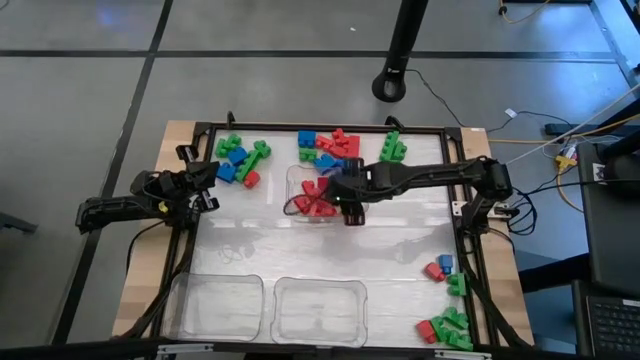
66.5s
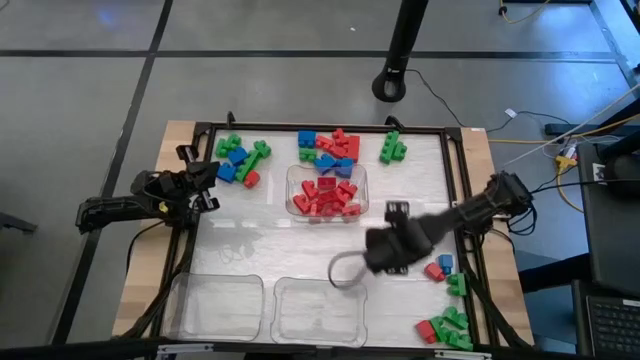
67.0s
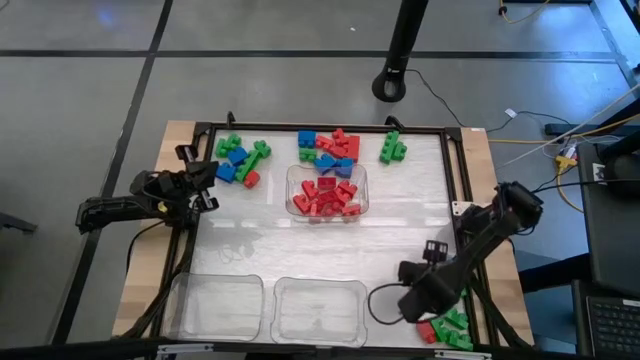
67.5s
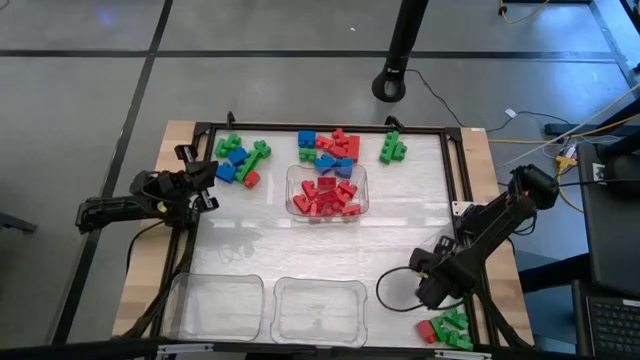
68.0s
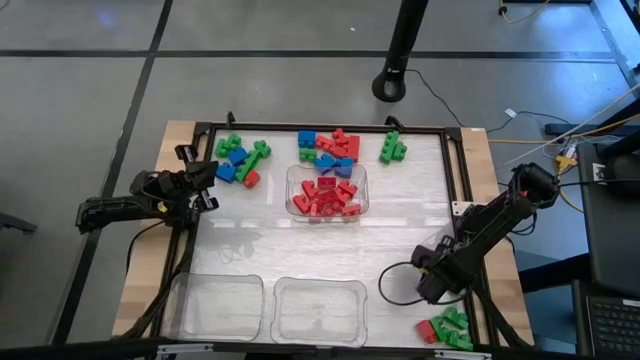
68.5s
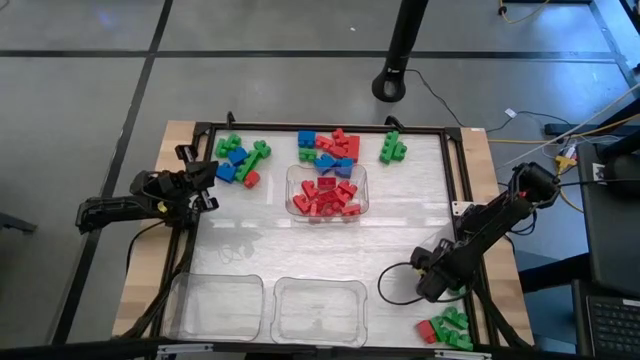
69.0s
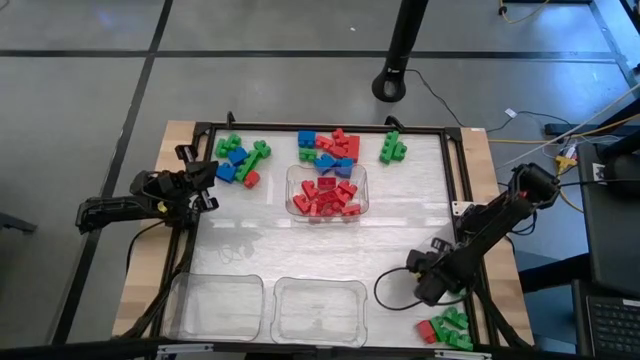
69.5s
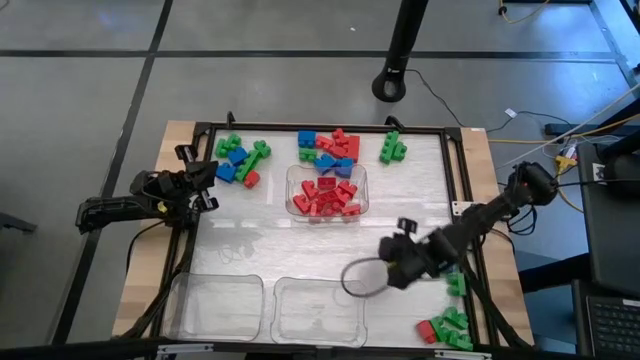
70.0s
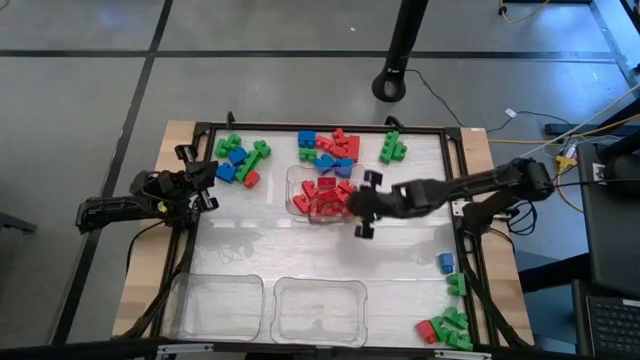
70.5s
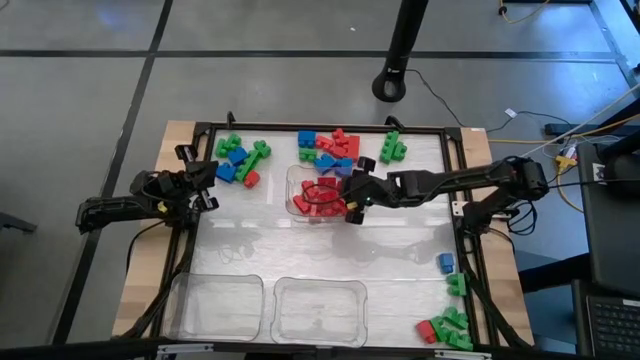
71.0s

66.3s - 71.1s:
Task: Sort blocks
Put the red game piece into the top right transparent bin

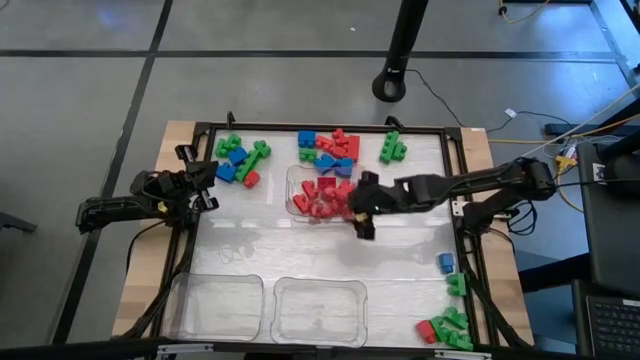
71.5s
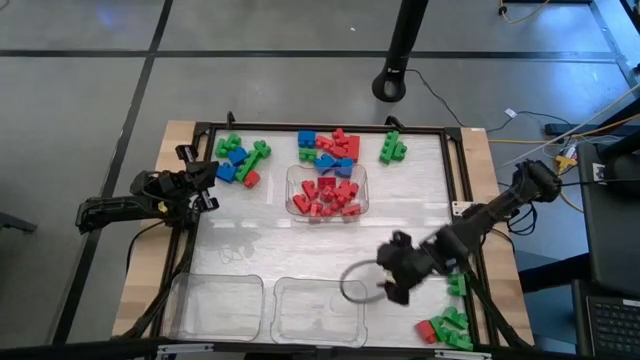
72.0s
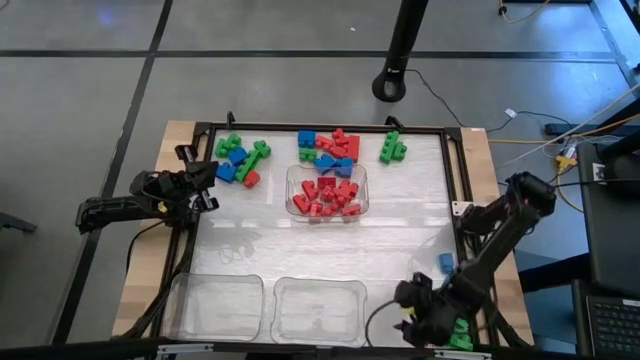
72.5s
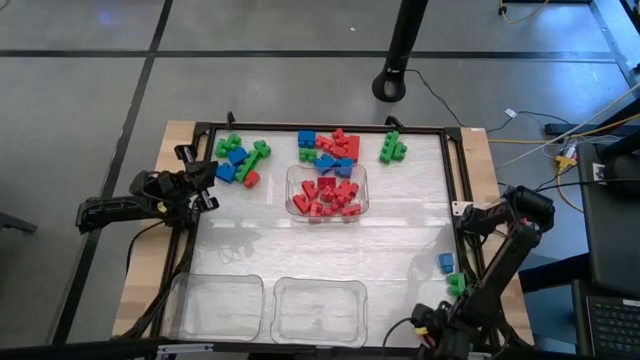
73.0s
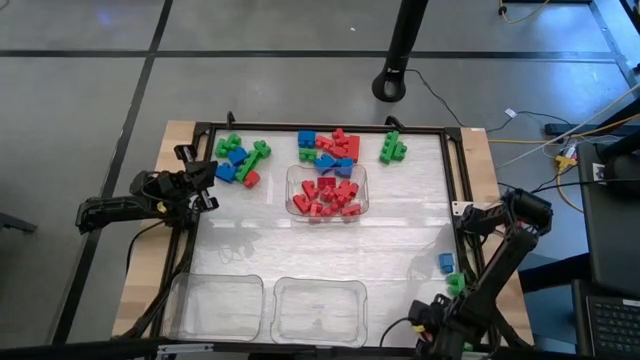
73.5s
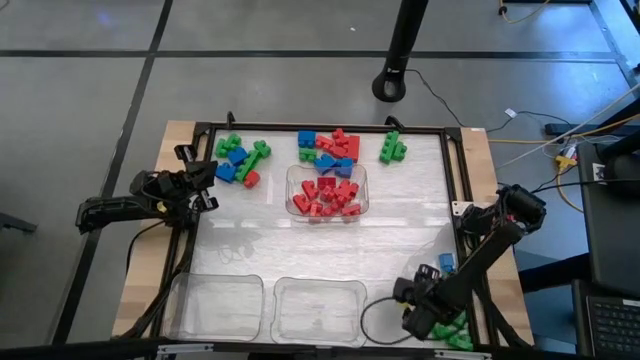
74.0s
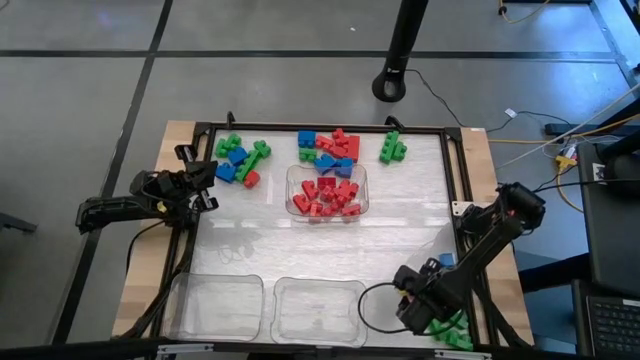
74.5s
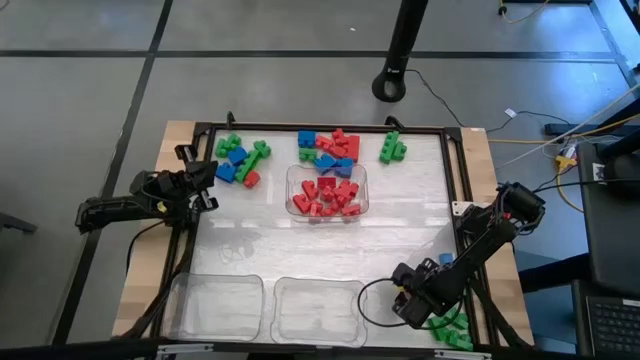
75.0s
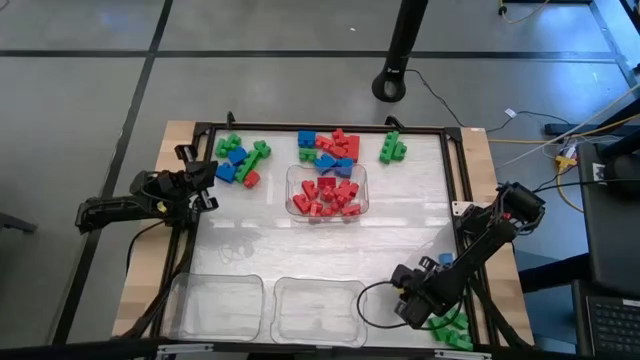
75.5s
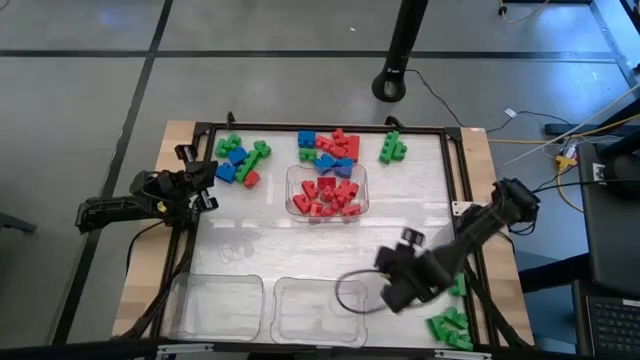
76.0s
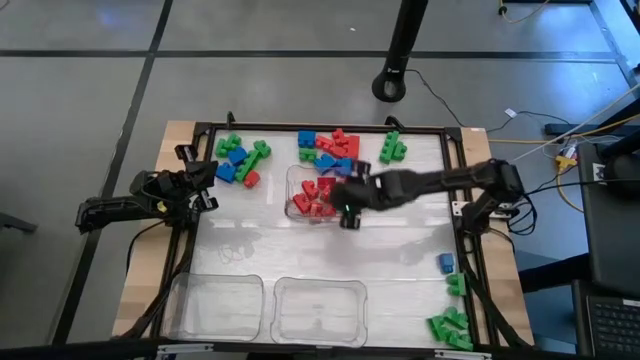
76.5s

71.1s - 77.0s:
Put the red game piece into the top right transparent bin

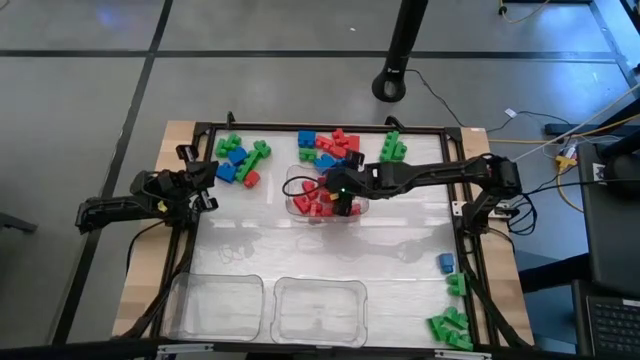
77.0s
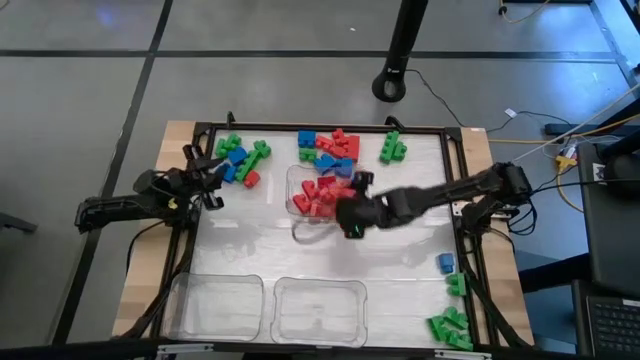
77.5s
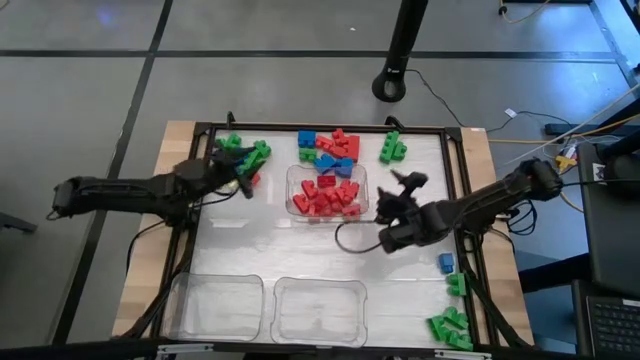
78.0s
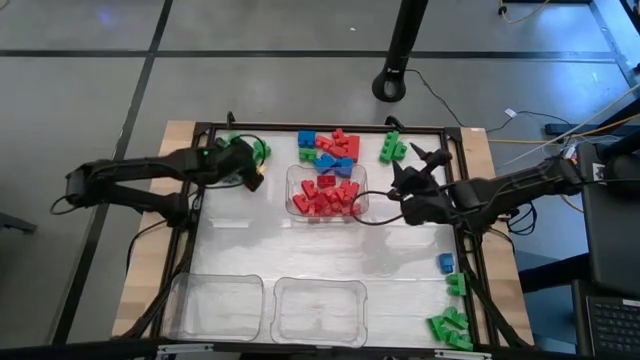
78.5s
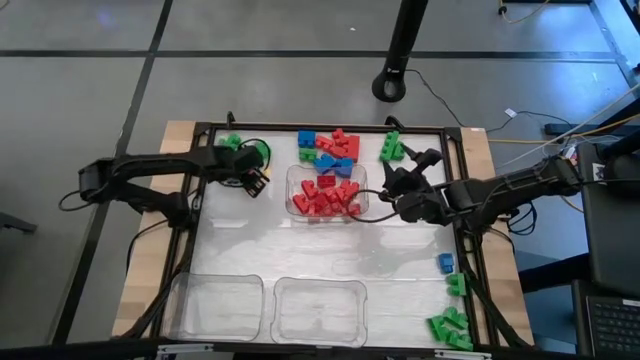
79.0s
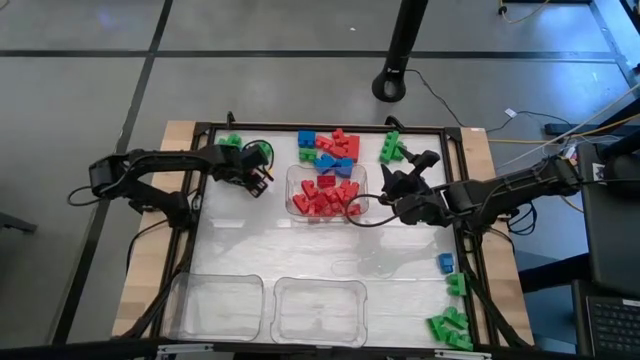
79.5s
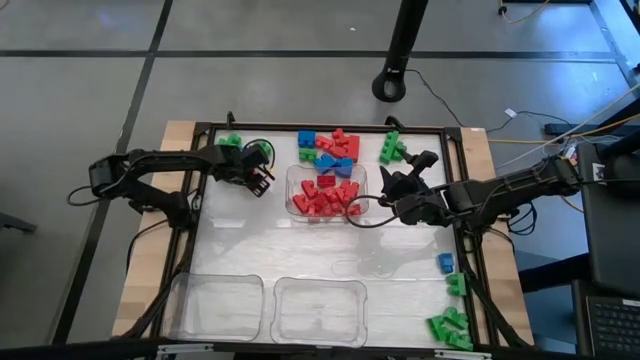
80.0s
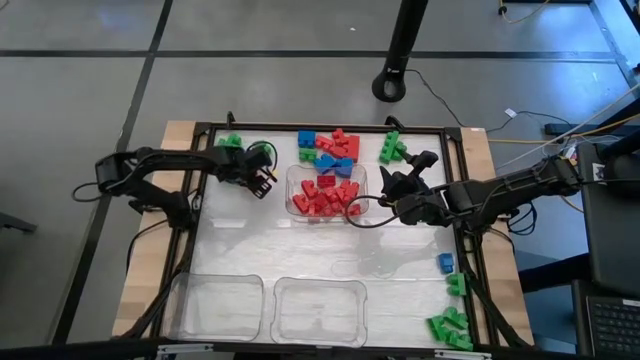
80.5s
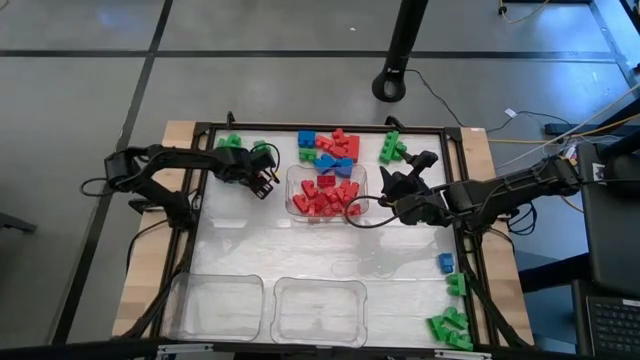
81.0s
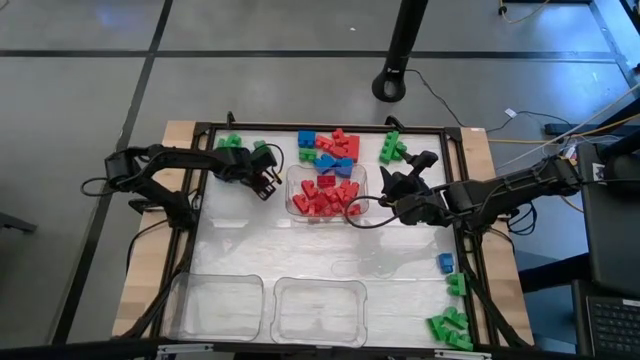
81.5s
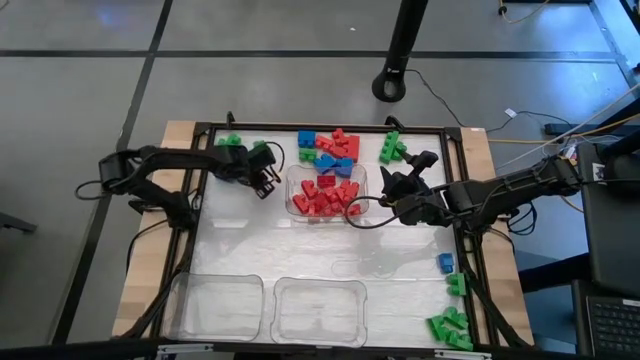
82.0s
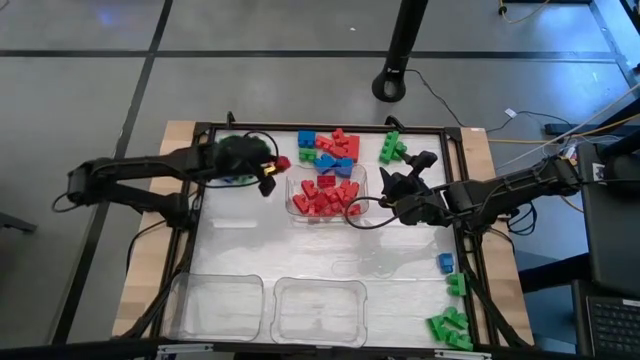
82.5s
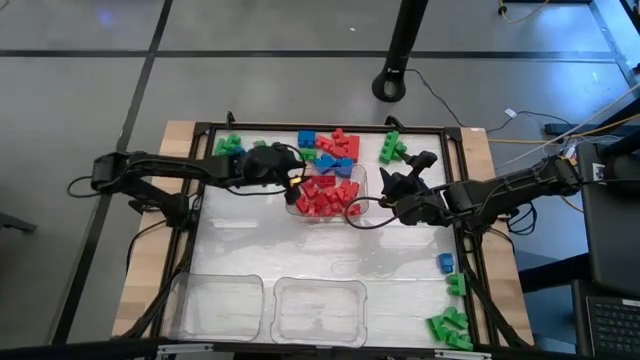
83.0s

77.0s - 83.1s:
Put the red game piece into the top right transparent bin

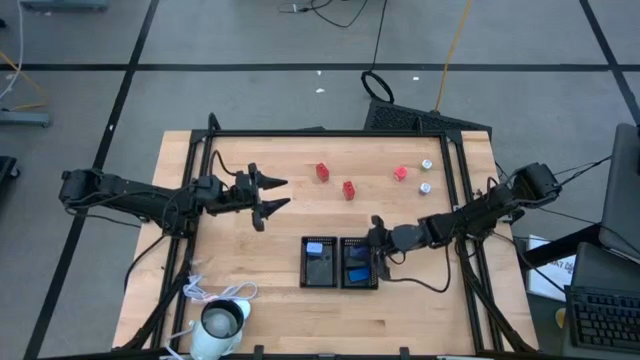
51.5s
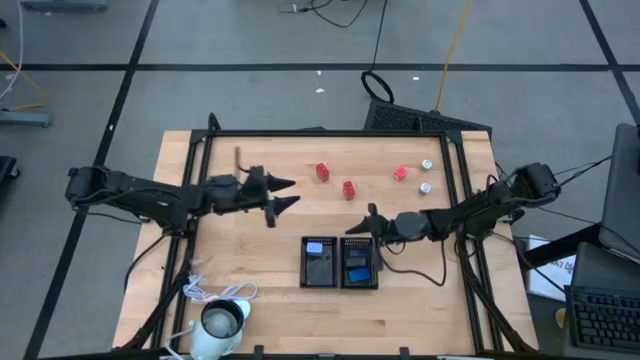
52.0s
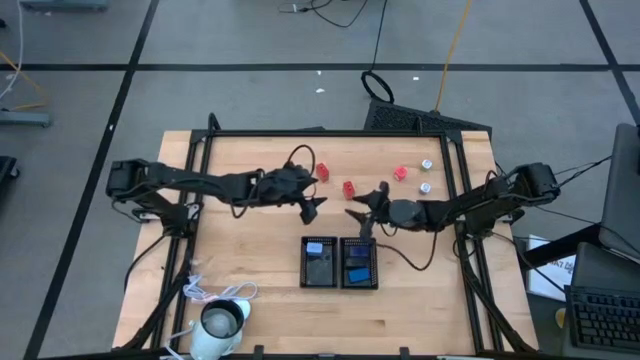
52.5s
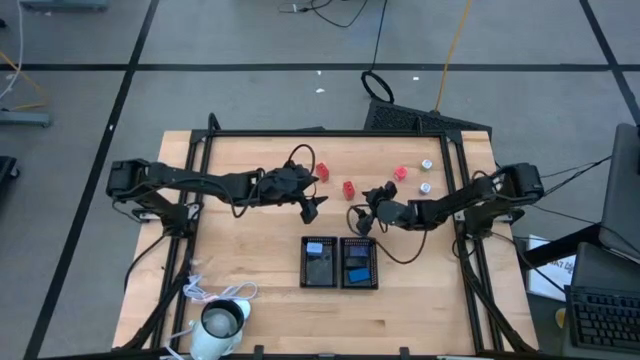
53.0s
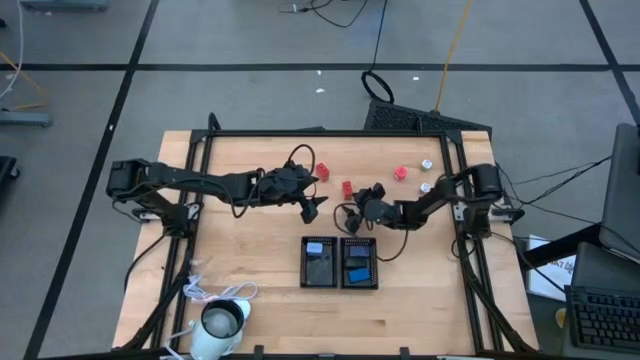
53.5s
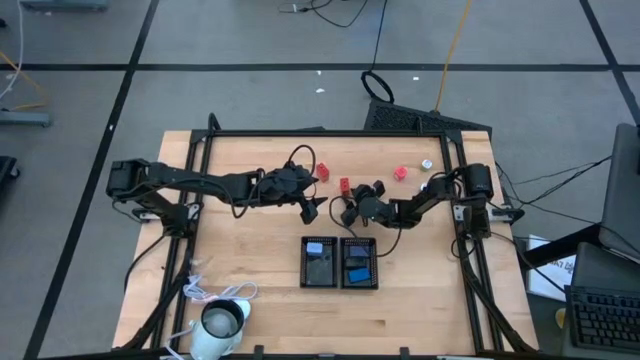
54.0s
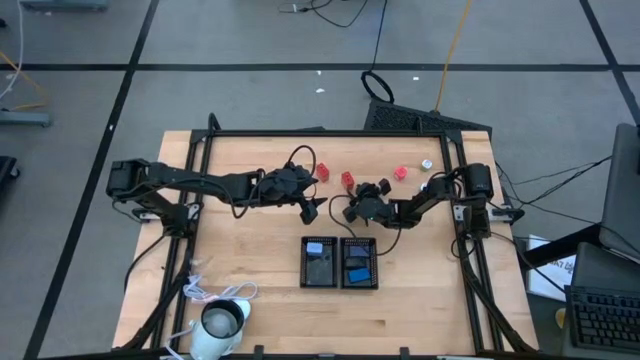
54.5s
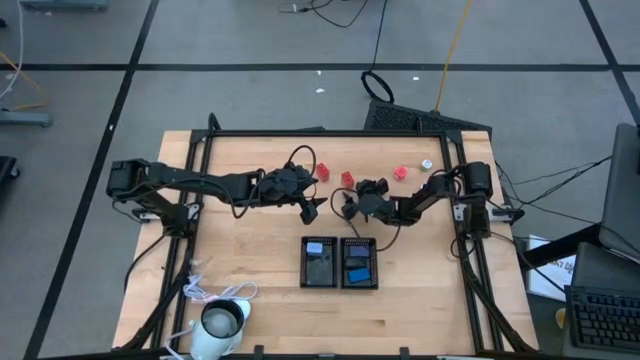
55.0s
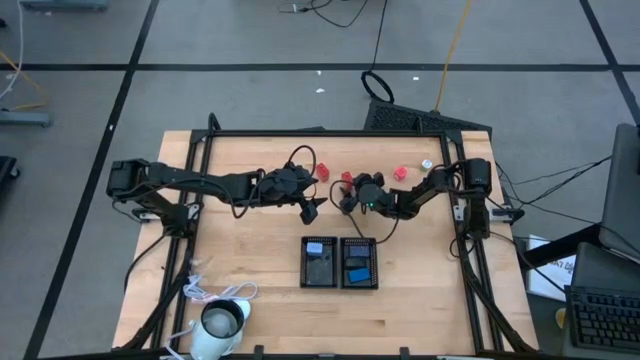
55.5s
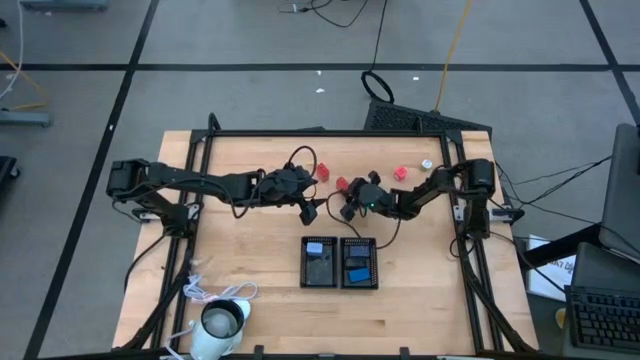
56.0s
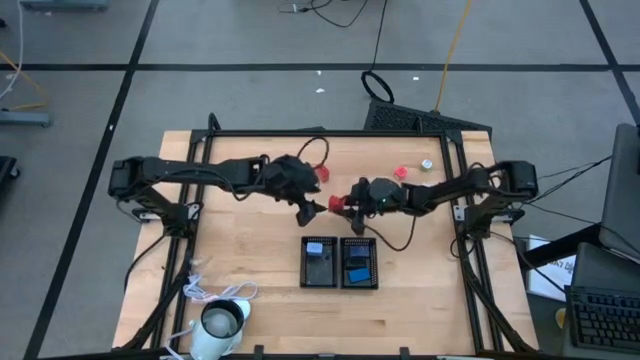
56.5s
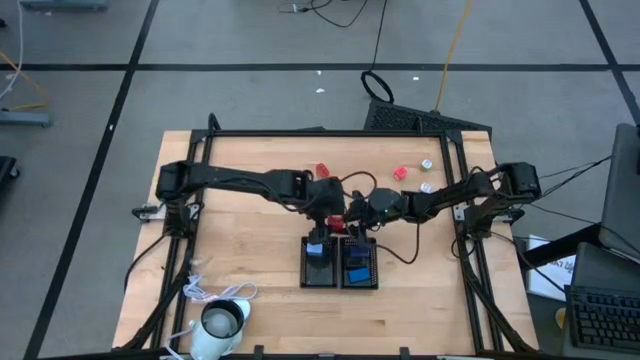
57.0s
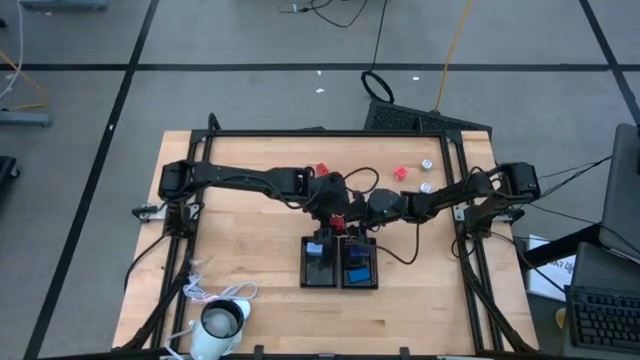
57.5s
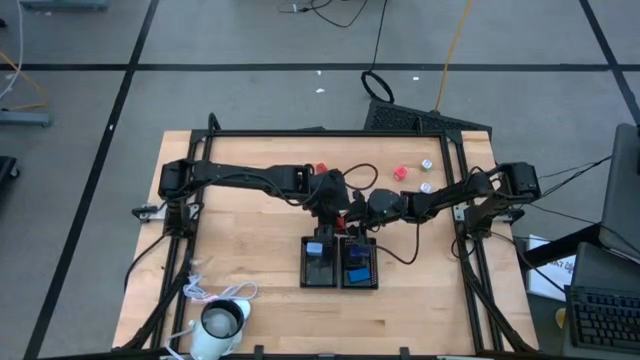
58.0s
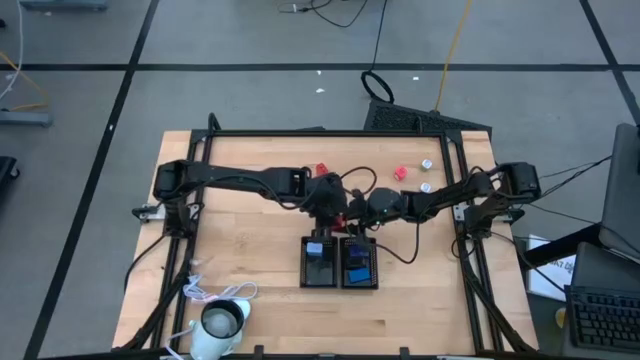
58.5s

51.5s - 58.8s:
Task: Pick & Place Office items
Put the right red charger adapter into the left black basket
